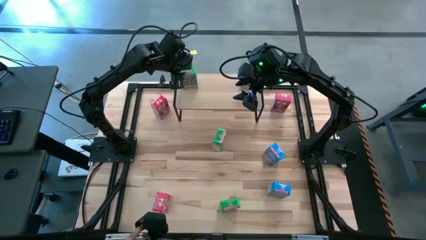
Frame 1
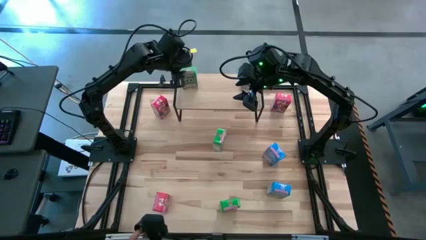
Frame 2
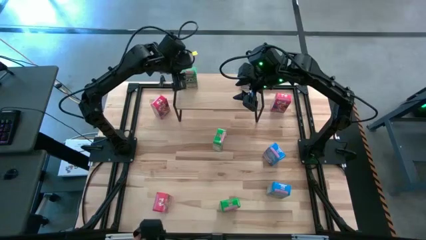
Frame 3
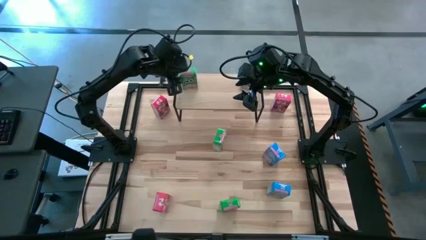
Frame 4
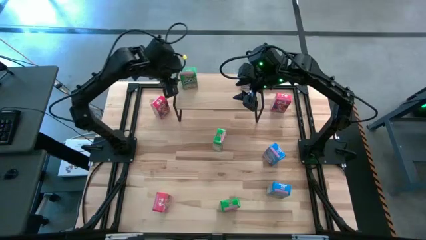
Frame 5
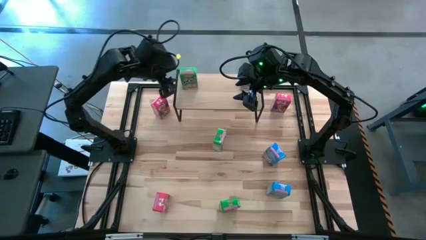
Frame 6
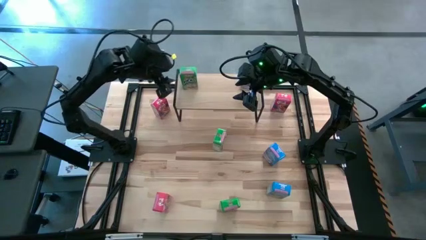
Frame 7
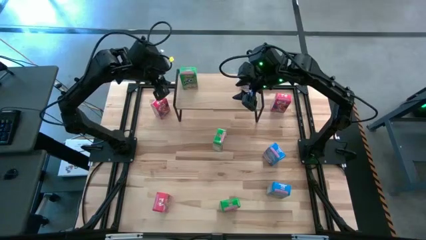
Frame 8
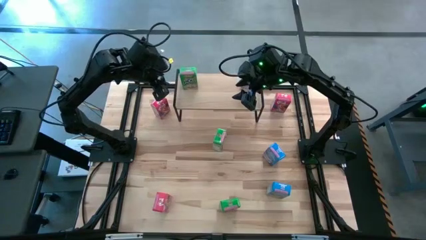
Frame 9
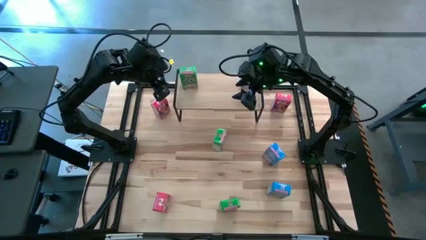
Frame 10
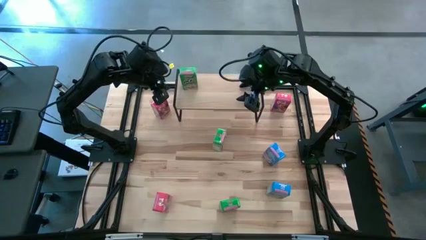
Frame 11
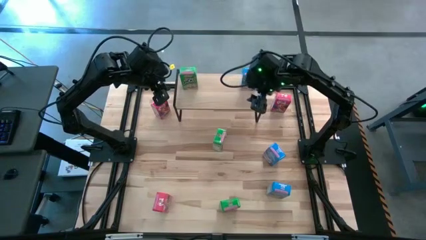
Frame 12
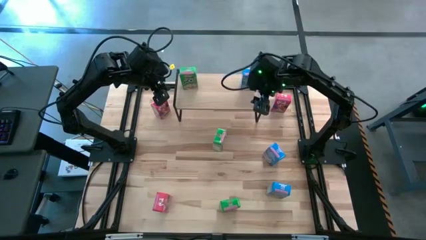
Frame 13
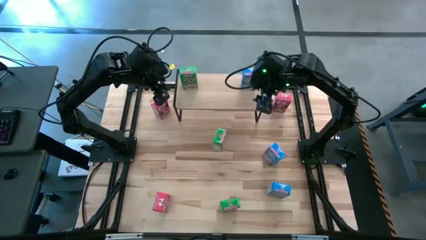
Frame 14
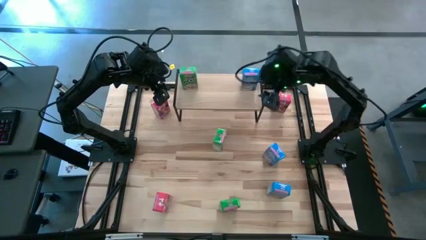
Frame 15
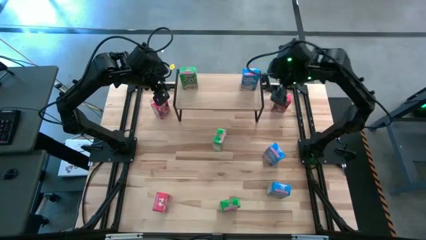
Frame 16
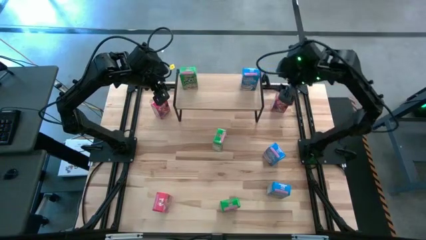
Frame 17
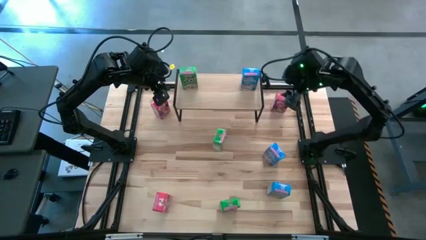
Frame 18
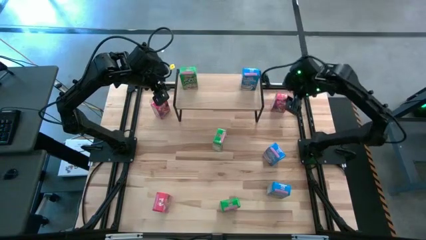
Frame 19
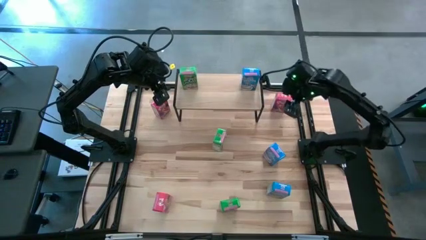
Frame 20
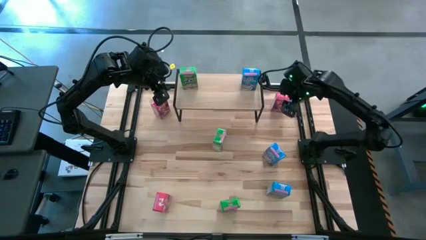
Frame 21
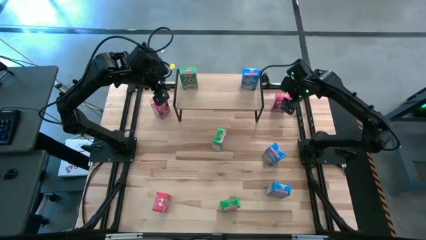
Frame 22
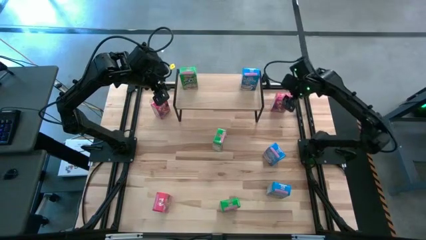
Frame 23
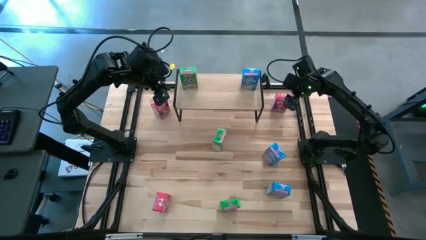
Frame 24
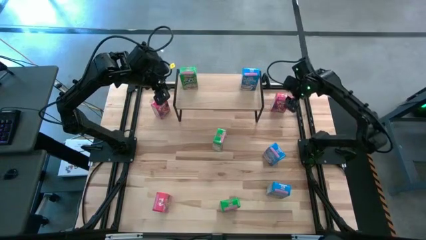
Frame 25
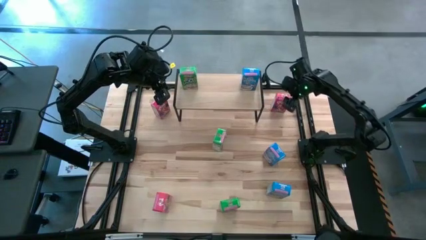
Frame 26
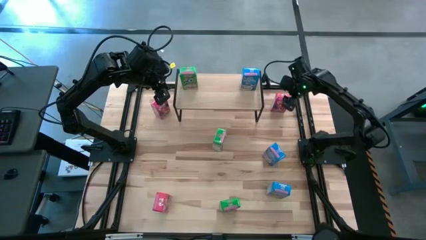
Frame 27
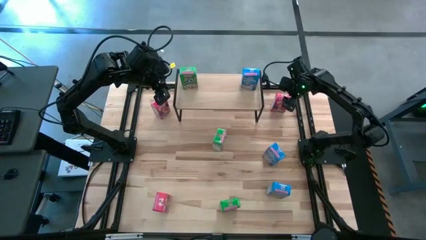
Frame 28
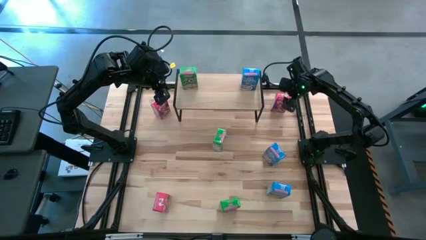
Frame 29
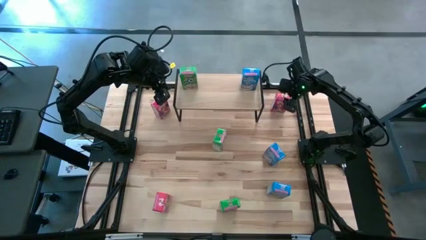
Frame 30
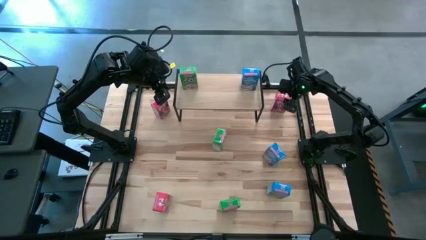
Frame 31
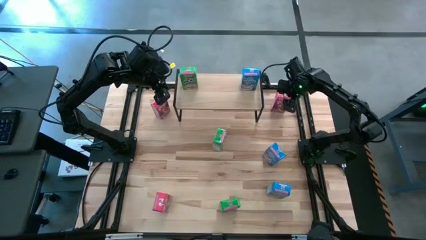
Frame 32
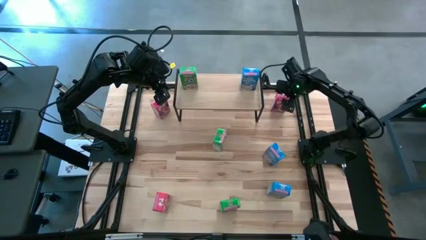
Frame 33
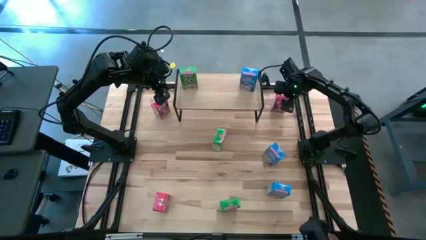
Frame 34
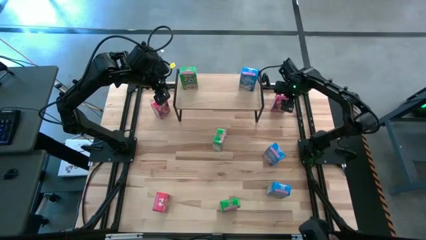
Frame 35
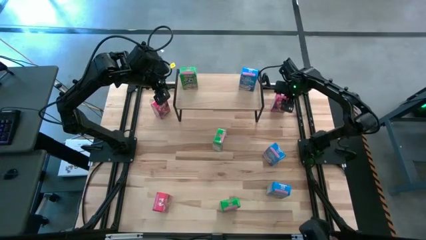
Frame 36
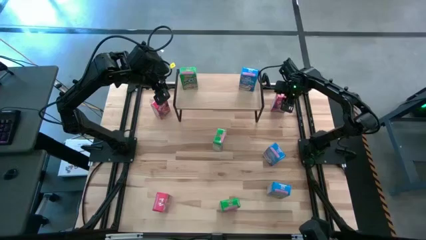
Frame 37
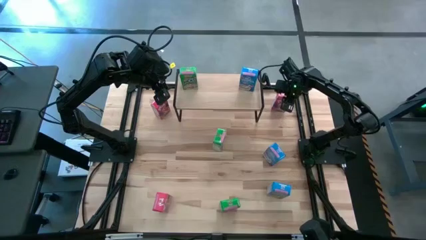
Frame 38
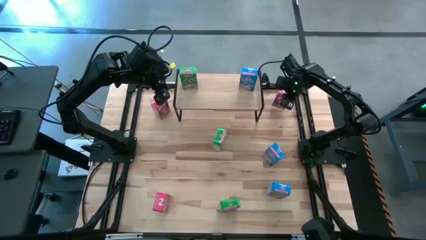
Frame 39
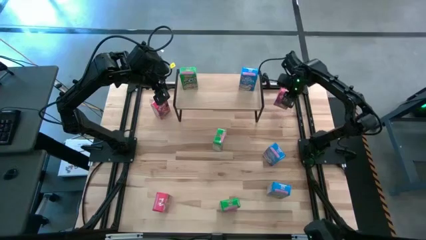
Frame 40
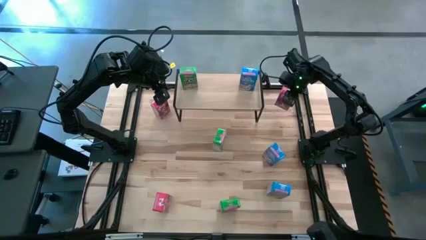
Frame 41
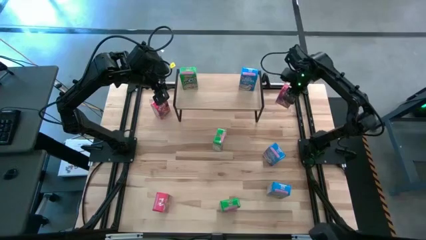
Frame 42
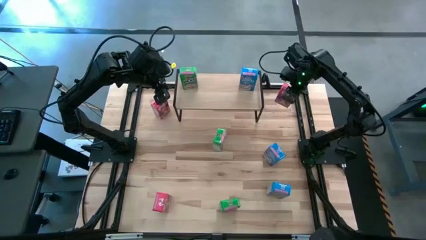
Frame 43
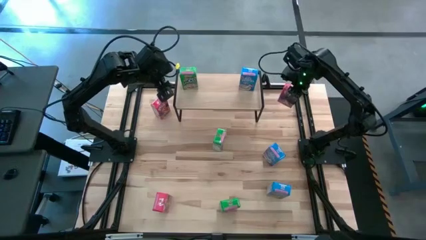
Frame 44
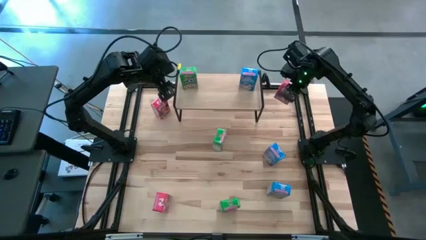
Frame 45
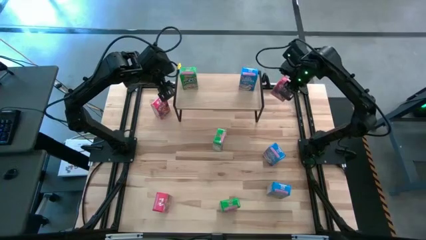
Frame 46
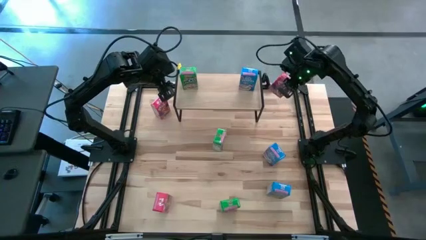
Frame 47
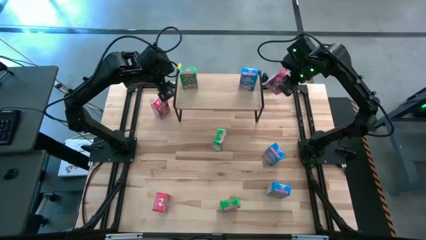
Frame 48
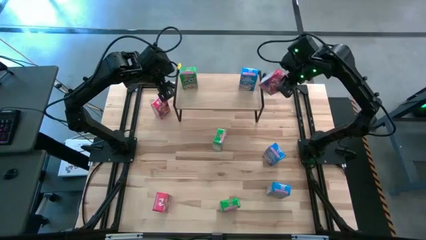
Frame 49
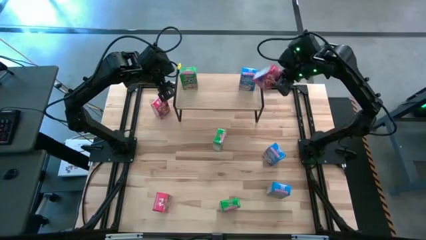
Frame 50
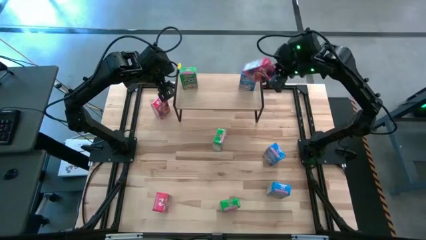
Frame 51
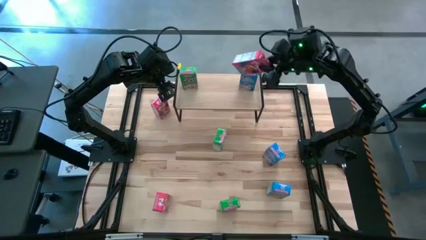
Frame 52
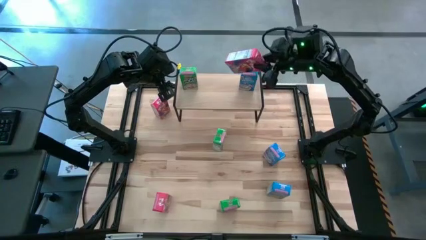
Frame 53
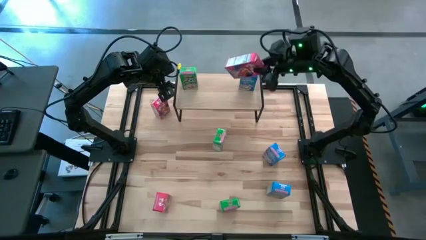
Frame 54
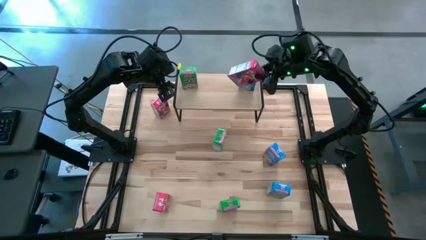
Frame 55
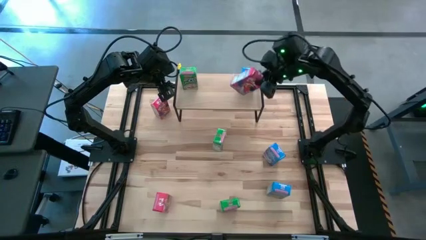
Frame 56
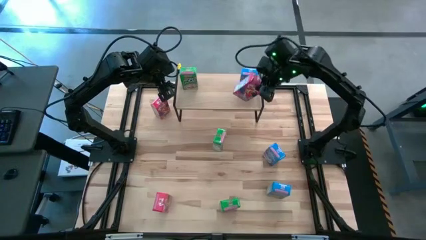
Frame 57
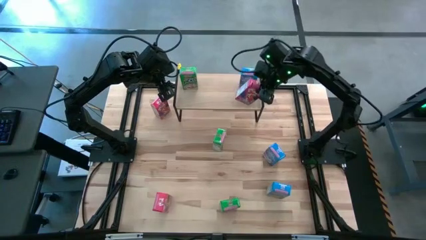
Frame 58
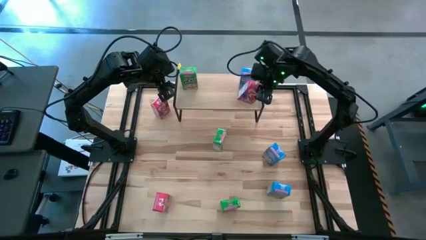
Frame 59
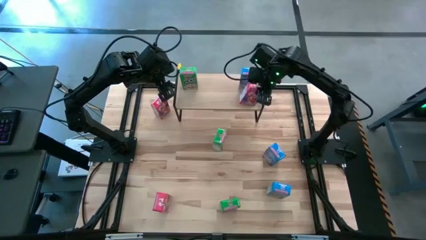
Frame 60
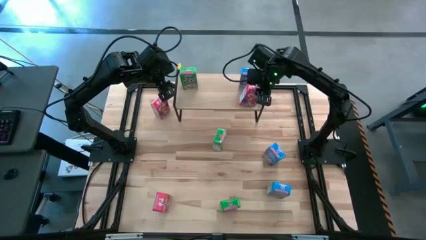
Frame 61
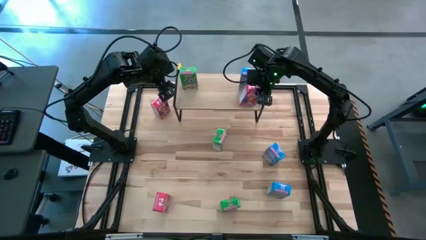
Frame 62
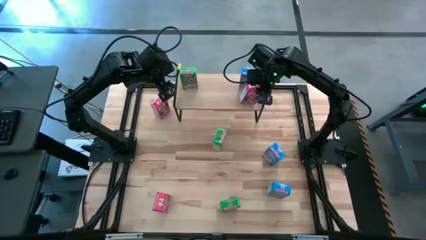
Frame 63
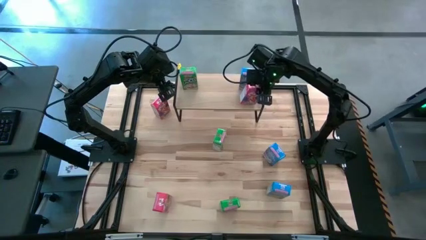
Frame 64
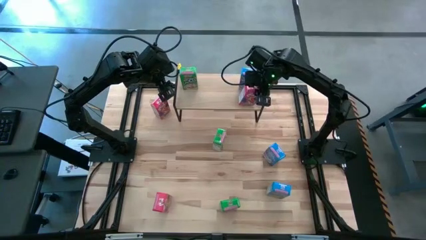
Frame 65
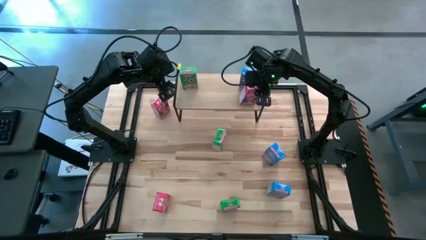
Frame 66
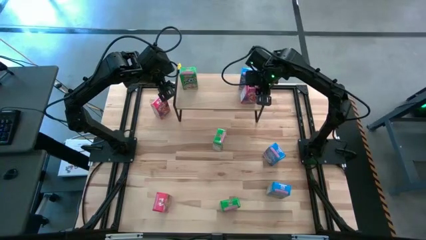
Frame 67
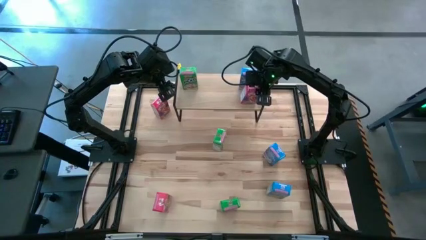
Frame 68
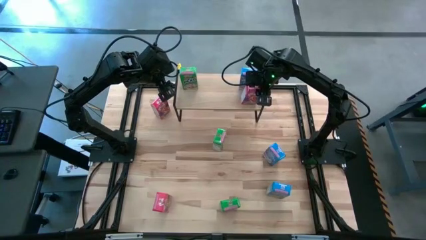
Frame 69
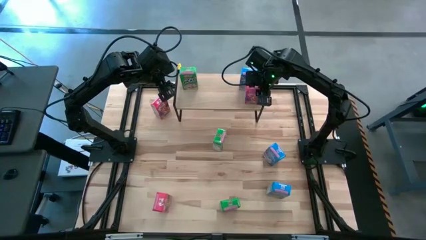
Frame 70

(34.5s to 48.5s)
Task: Stack cereal on shelf
Put the right red cereal box on the shelf
